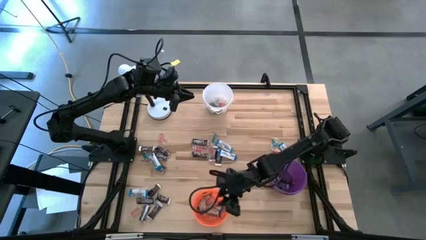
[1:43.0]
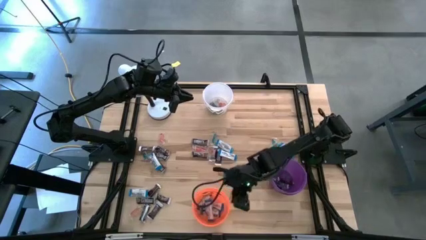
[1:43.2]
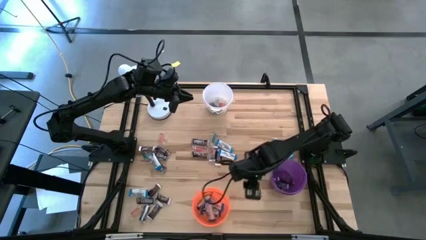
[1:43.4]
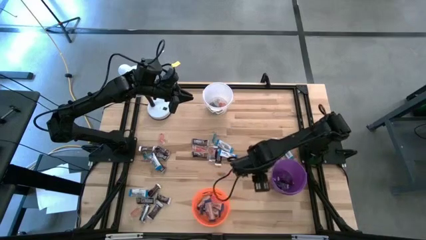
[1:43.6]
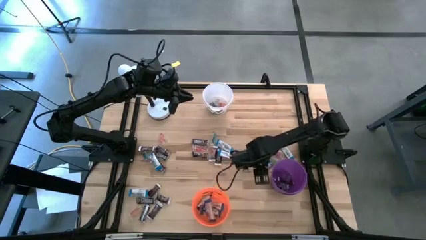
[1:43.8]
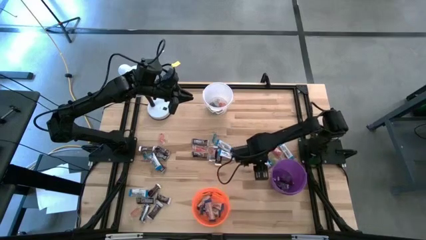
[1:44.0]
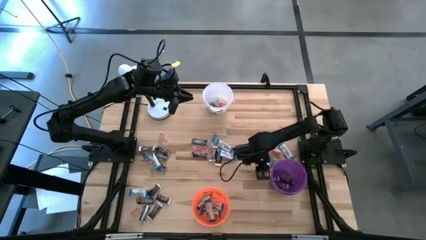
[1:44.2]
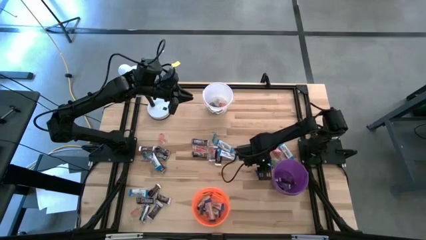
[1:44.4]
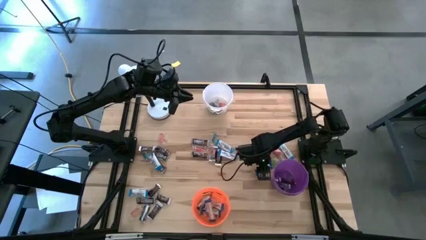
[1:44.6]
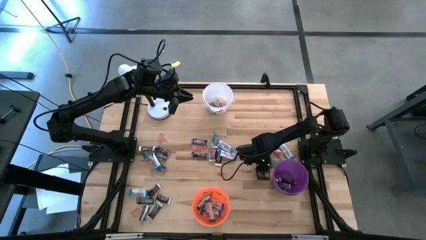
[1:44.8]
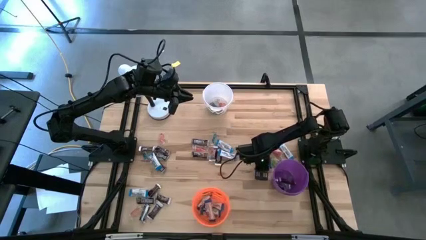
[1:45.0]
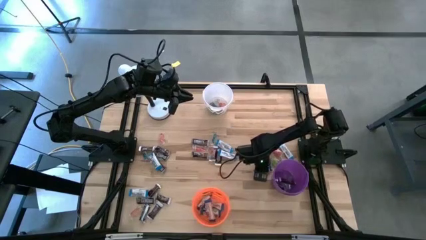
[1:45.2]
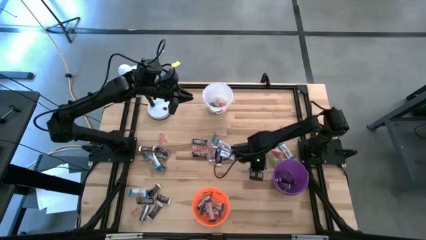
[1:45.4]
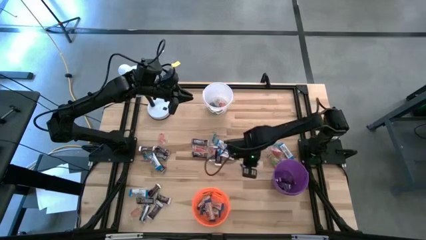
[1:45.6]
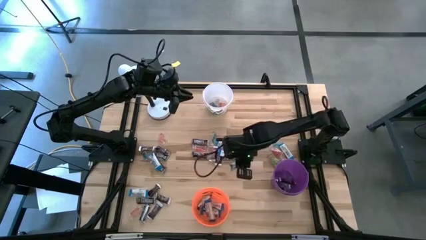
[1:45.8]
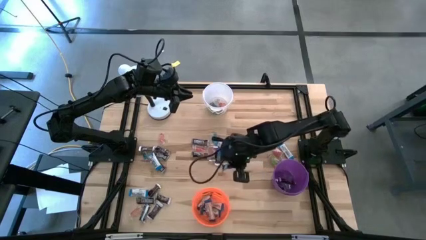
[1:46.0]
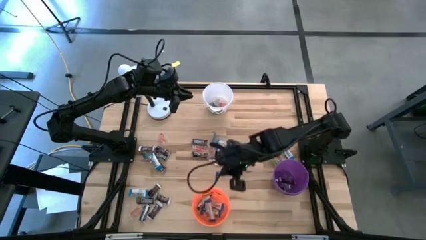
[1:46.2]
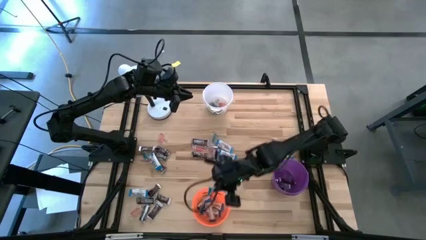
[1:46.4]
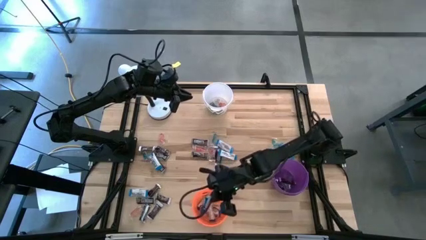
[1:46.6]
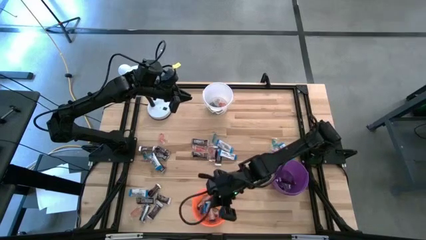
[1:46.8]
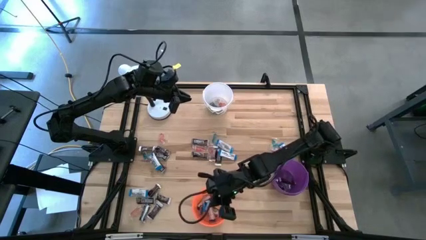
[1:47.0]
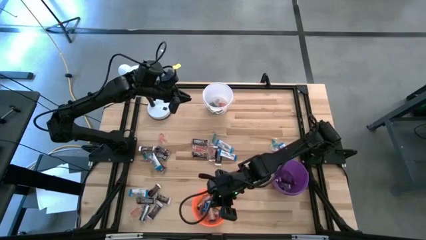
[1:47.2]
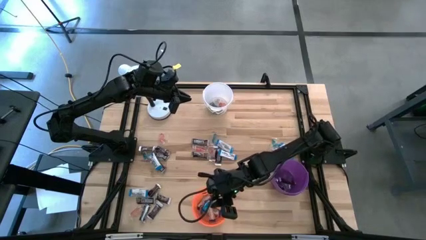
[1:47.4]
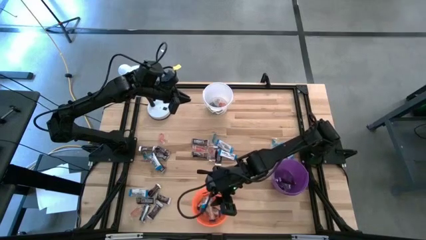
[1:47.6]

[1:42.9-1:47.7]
Task: Organize candy in baskets
Put the white chocolate bar into the orange bucket

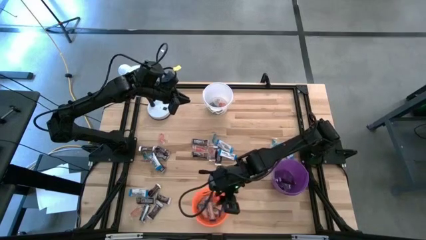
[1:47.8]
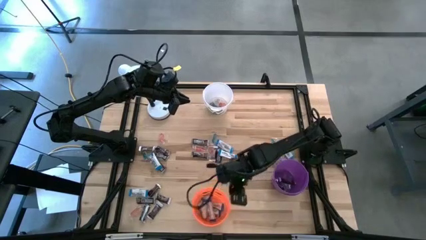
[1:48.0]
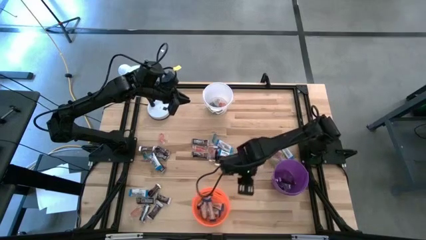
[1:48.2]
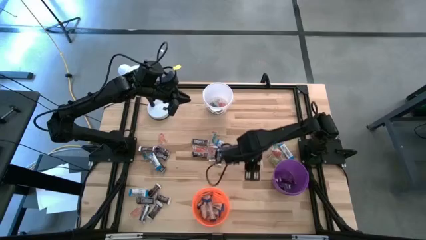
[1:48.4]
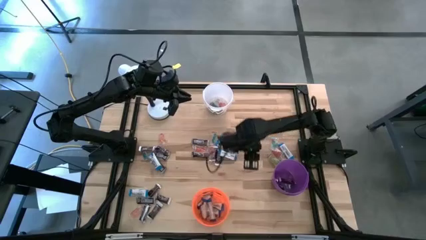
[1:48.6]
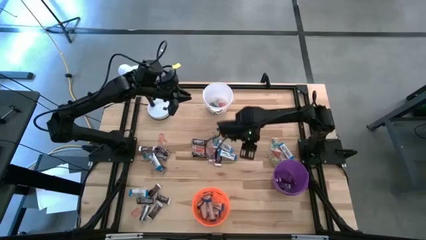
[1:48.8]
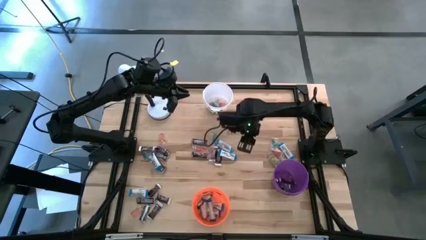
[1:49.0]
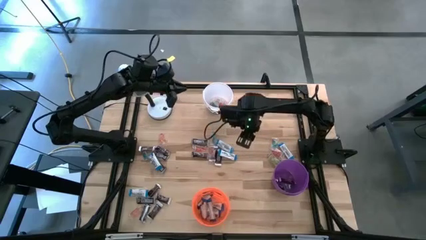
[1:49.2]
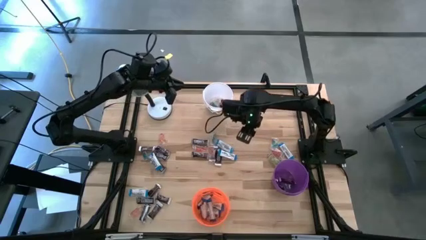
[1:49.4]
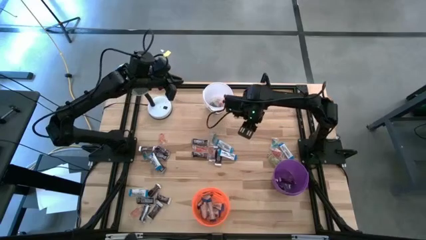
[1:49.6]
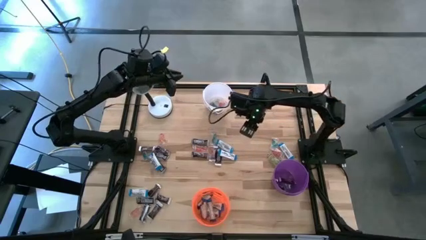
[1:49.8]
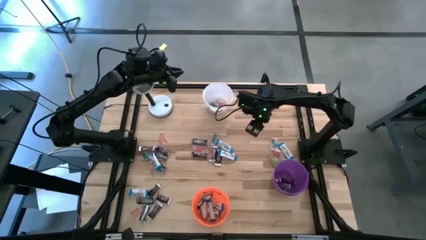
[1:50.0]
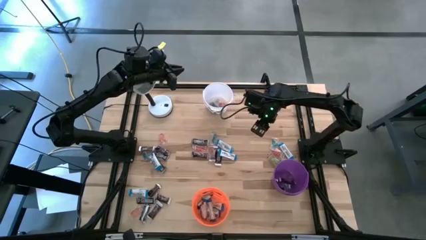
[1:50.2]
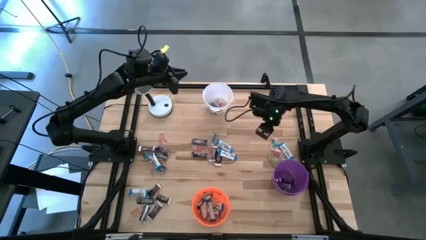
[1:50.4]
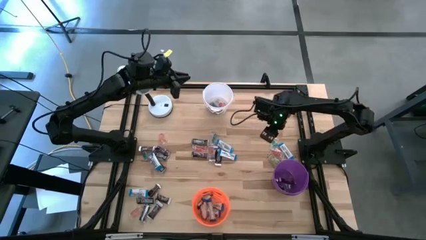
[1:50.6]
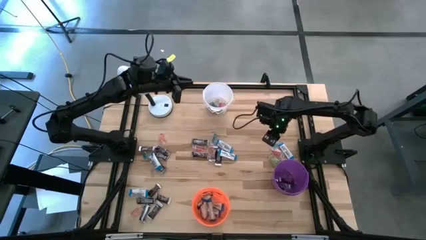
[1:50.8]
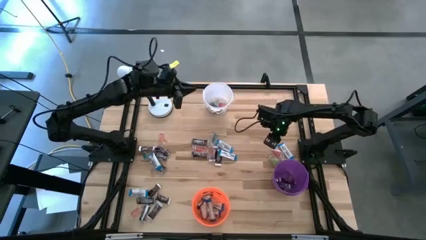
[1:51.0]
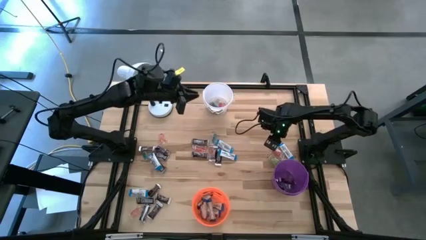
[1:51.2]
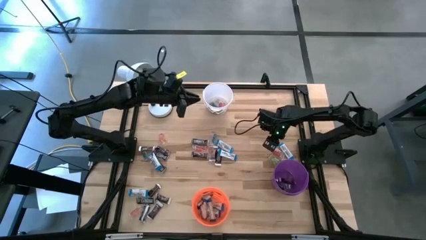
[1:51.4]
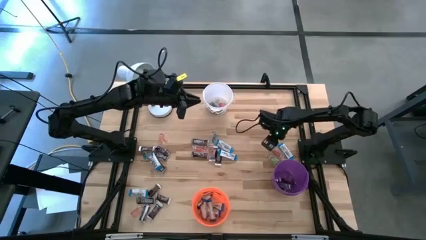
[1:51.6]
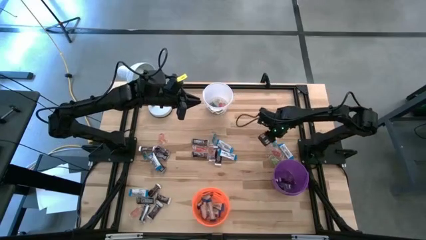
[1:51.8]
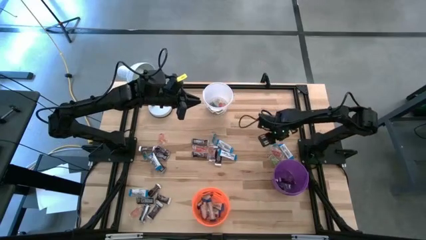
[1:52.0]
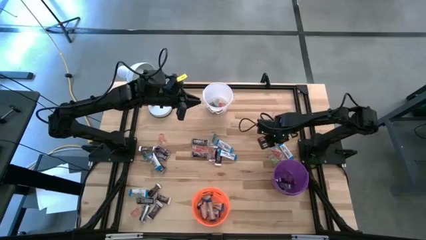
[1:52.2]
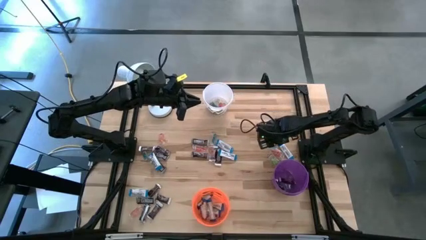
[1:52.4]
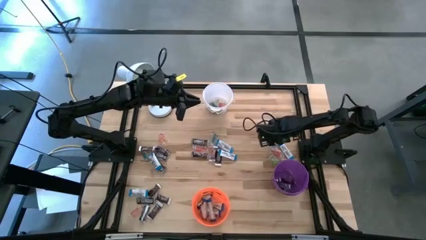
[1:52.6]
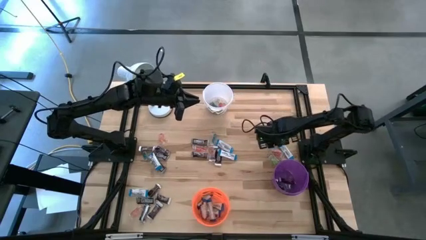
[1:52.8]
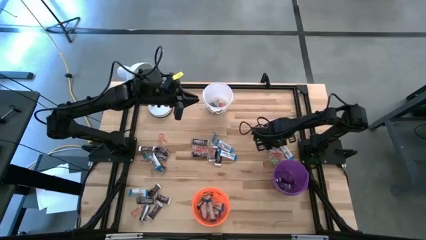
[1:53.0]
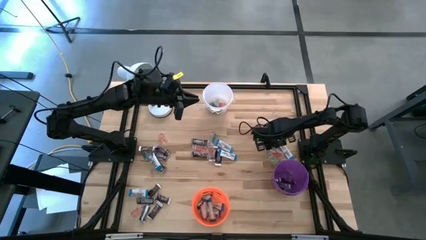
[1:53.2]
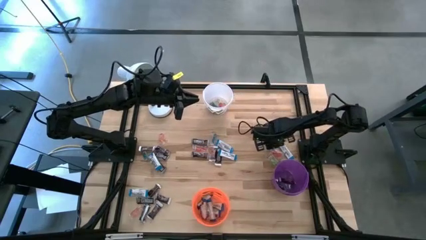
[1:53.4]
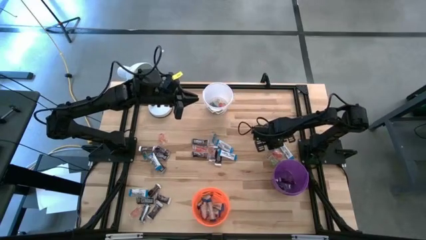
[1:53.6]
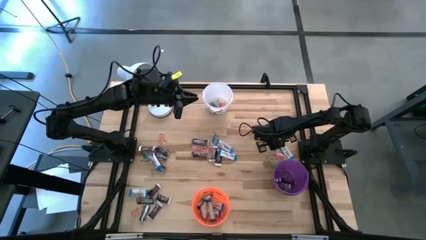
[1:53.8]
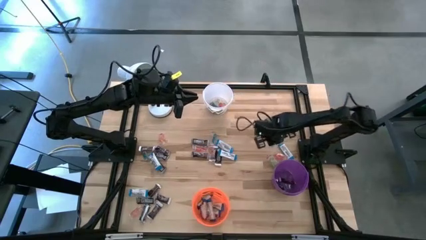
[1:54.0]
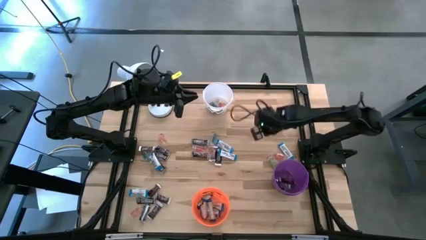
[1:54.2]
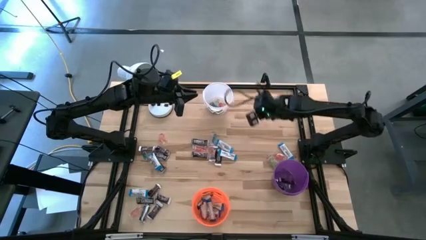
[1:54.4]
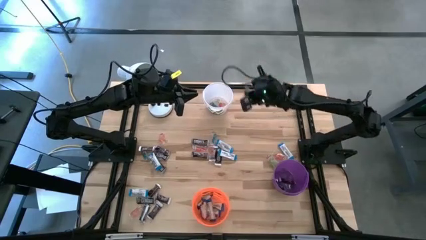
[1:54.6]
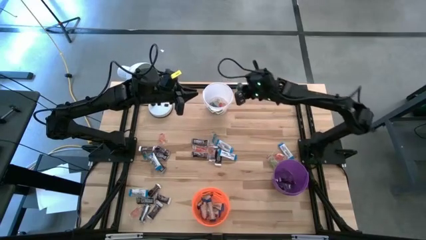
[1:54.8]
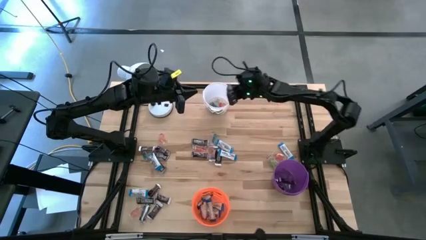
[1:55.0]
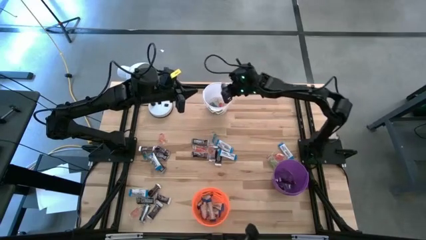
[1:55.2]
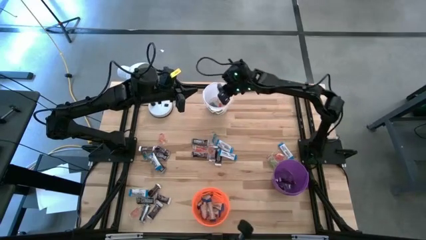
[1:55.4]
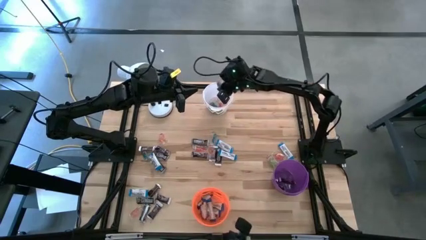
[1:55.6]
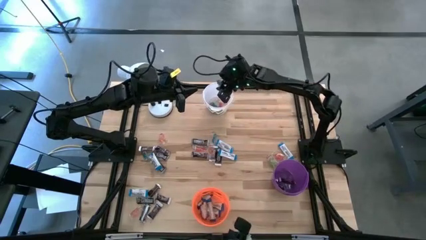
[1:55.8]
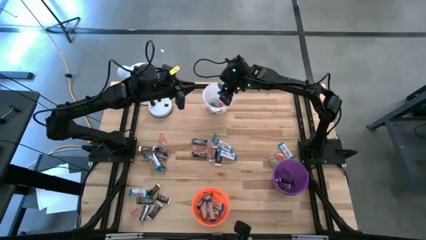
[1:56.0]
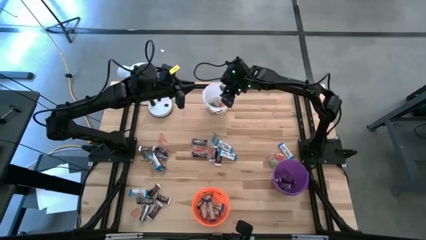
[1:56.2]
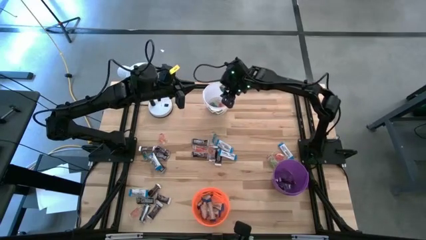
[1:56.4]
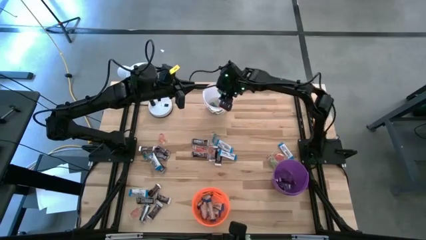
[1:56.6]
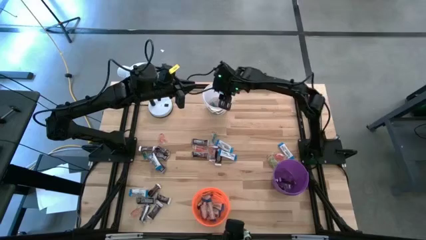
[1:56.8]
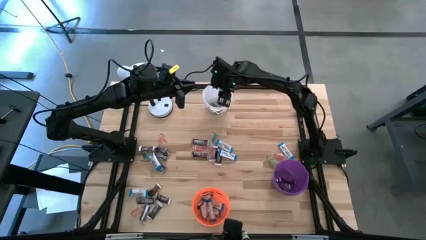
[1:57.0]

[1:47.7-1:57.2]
Put the blue gummy into the white bucket
